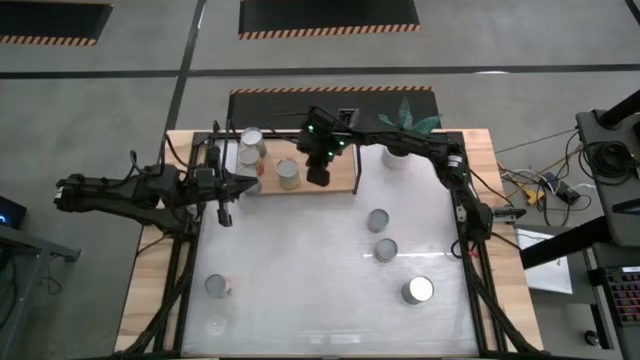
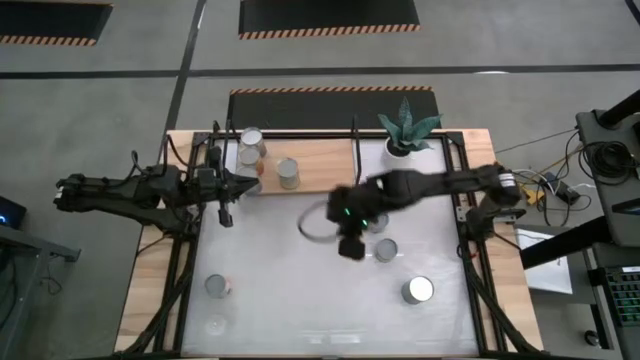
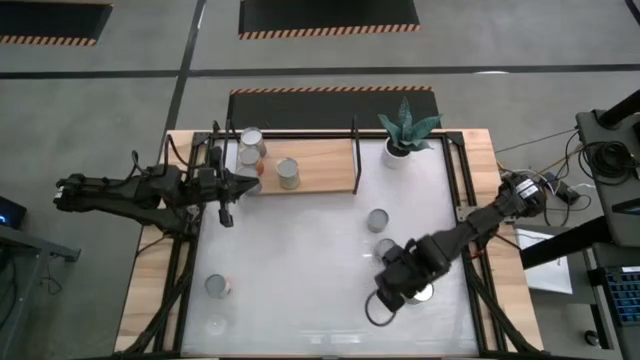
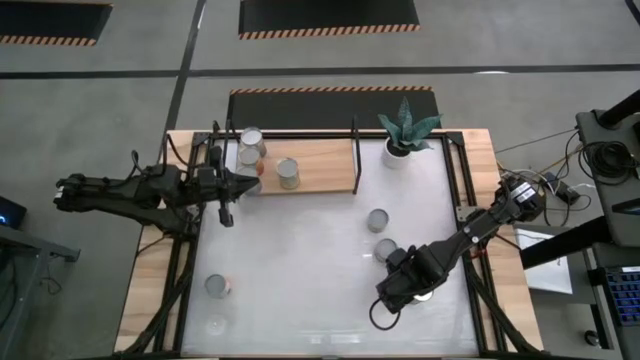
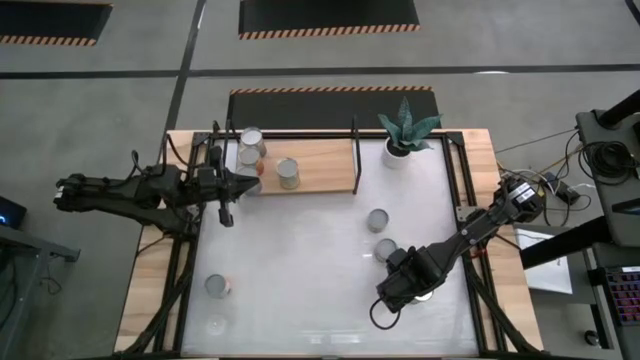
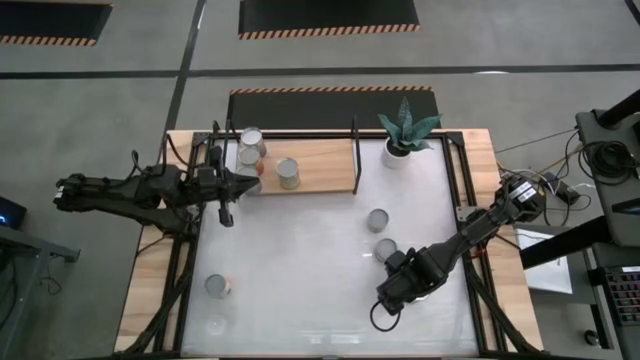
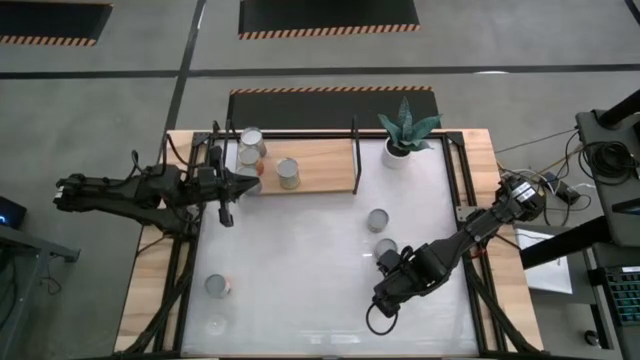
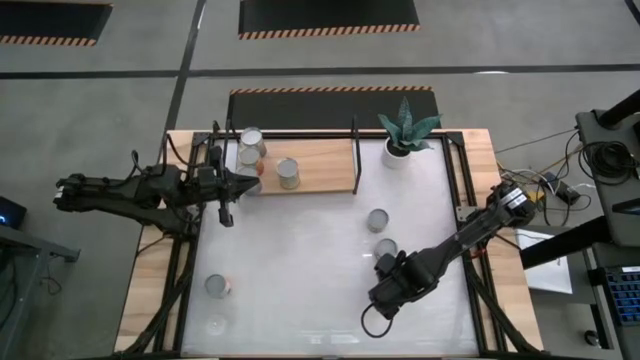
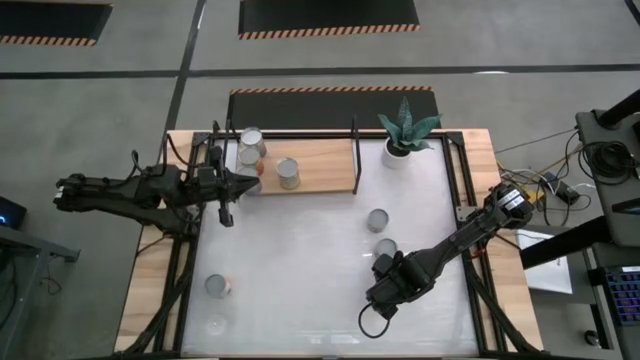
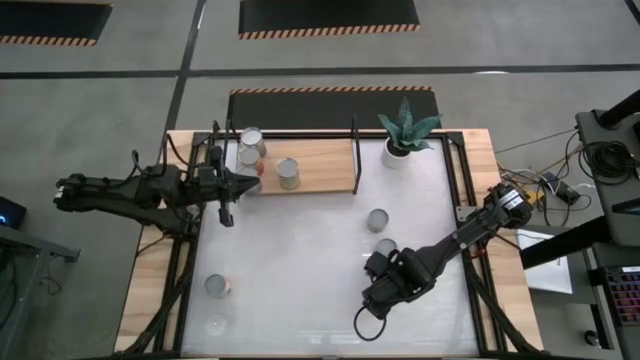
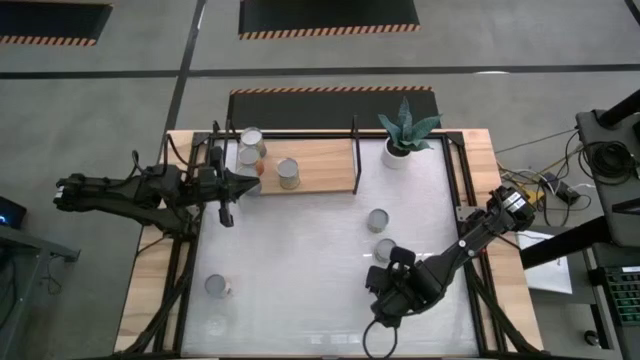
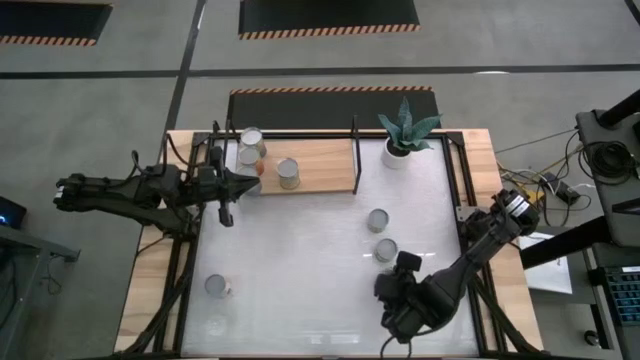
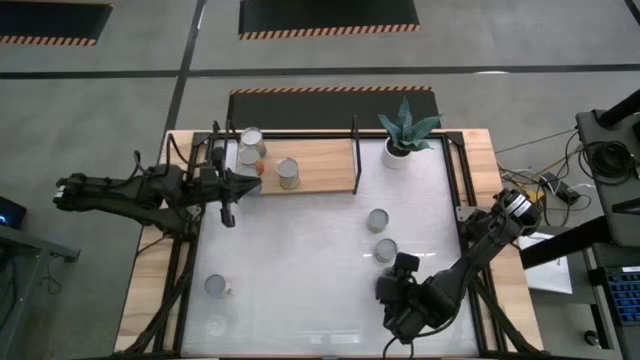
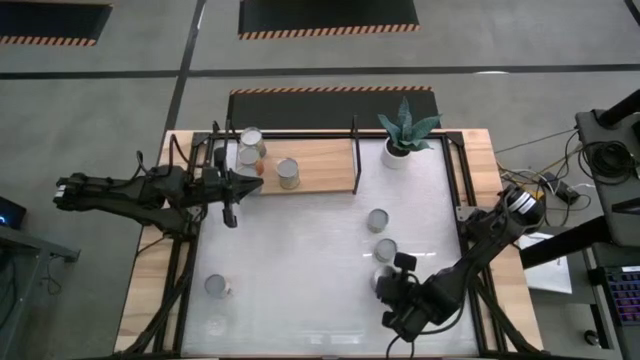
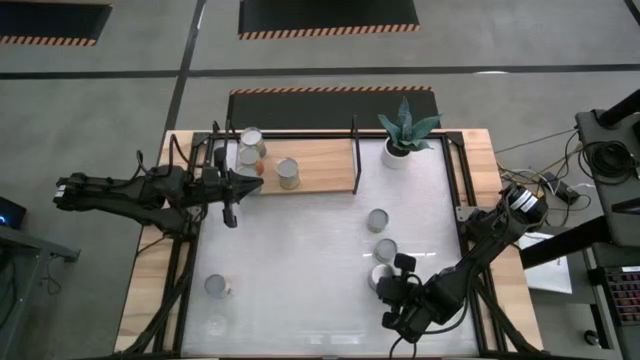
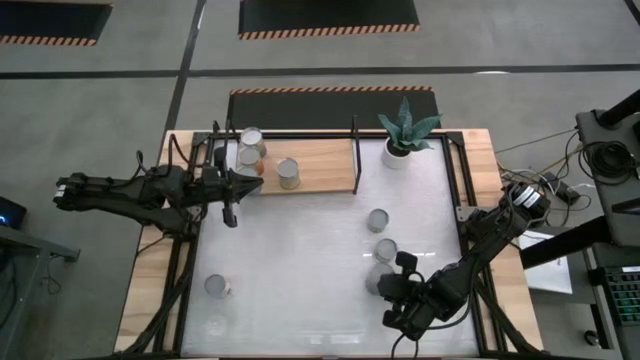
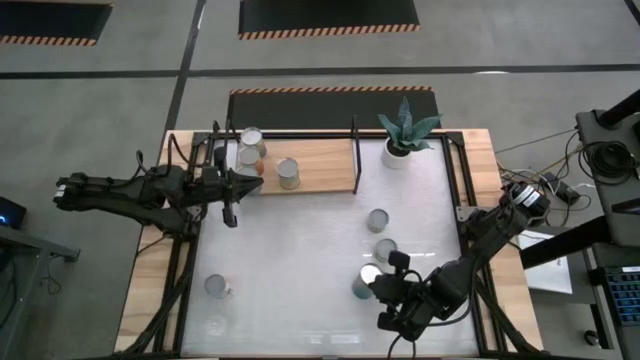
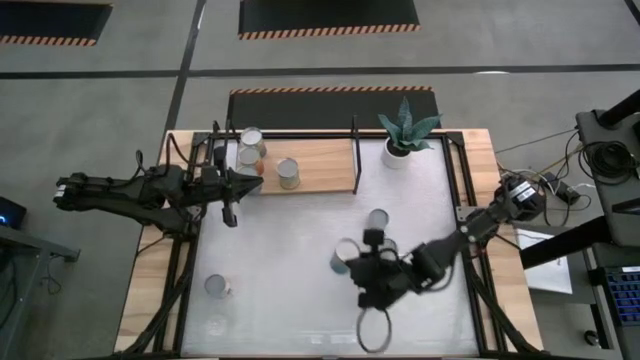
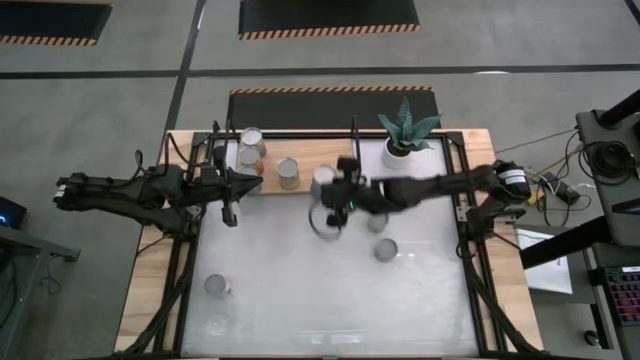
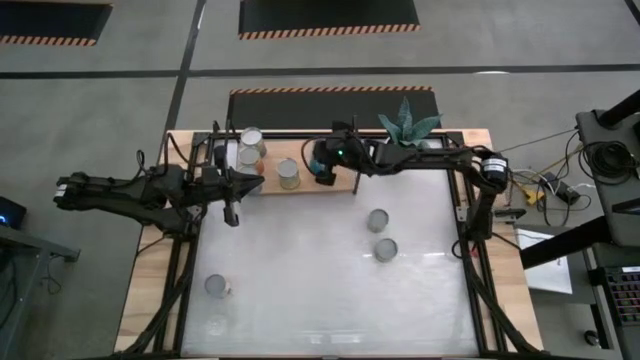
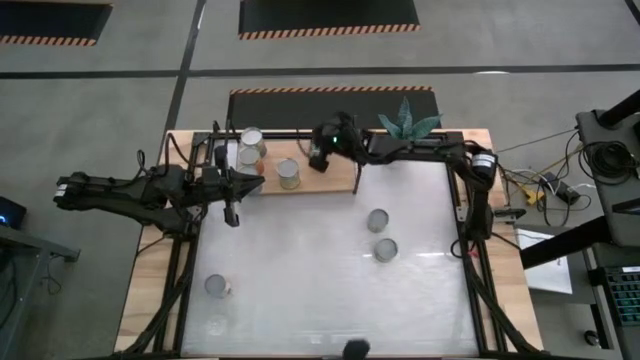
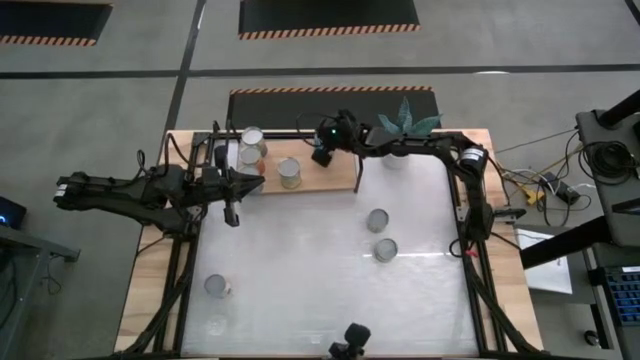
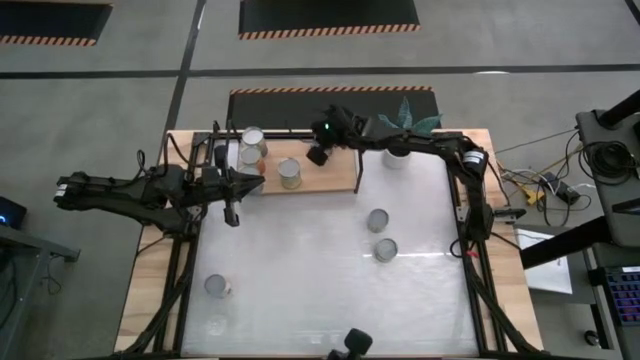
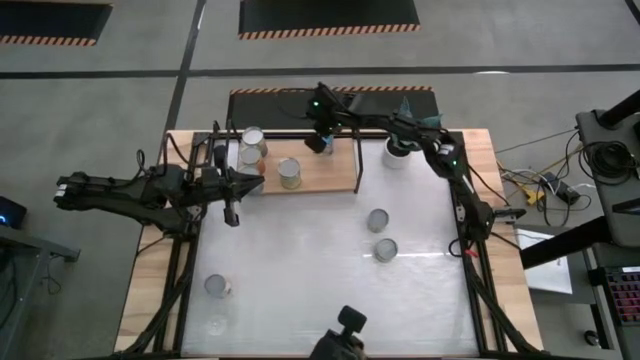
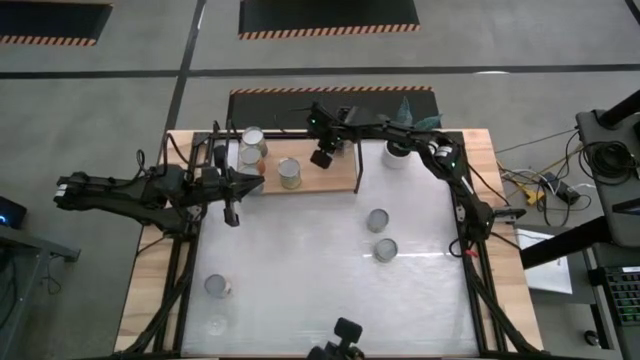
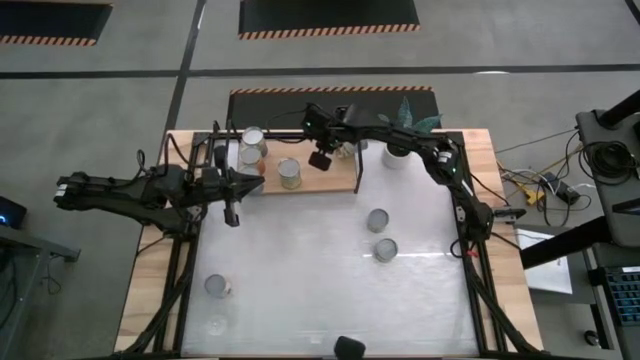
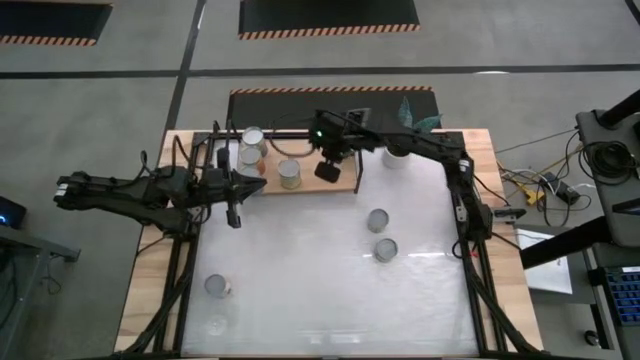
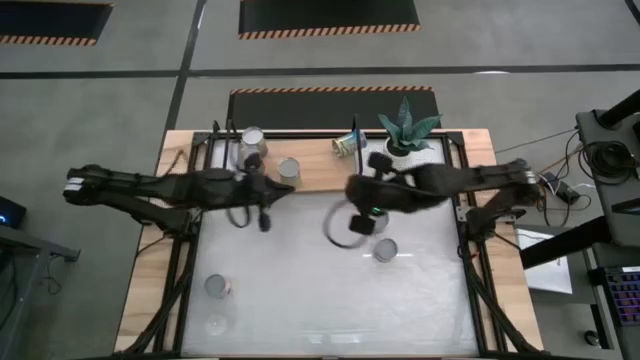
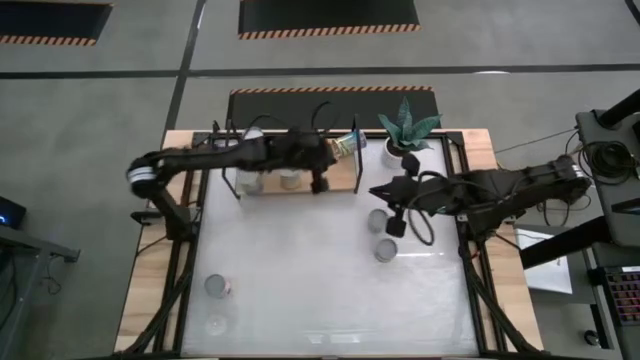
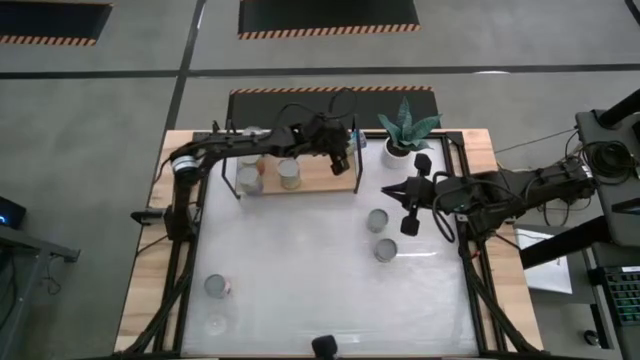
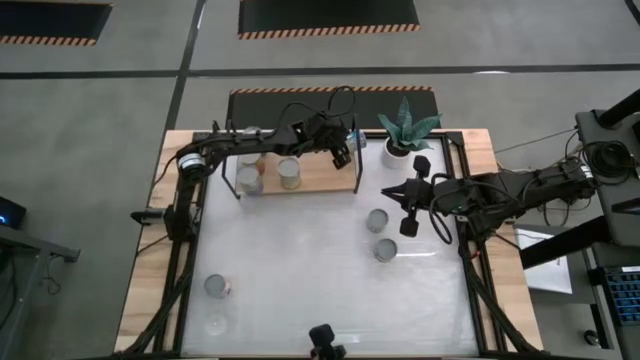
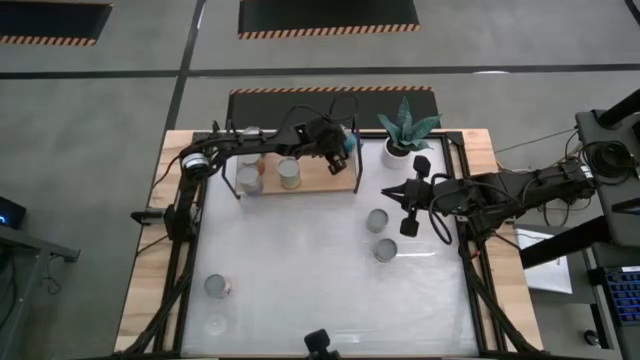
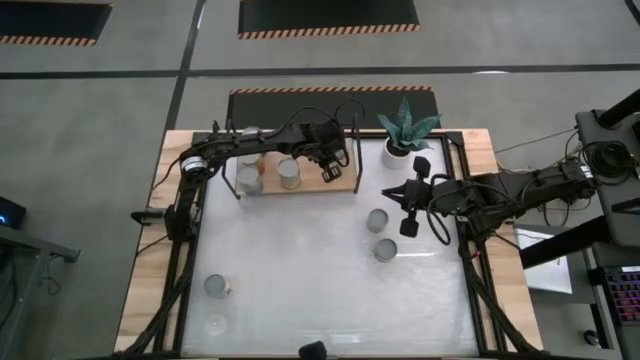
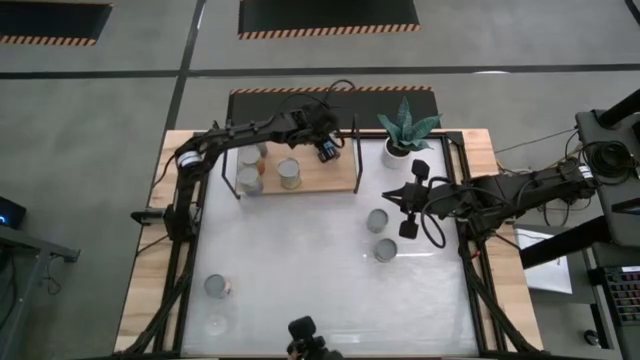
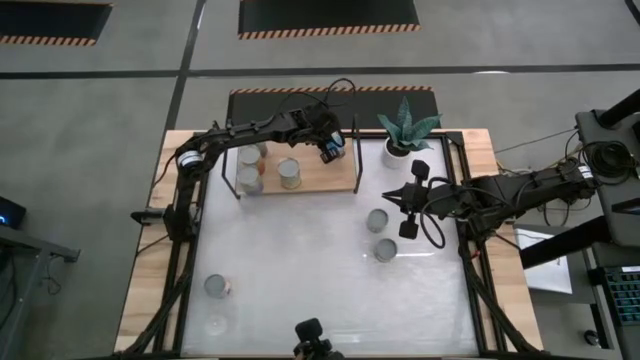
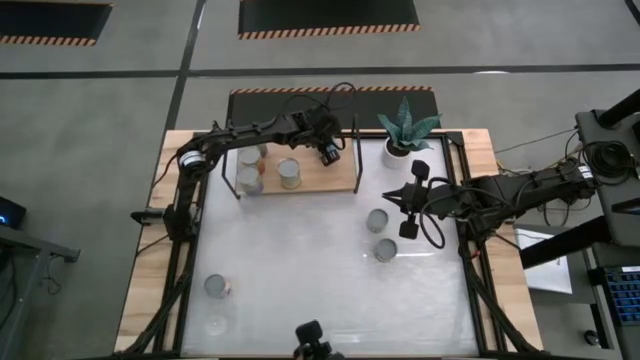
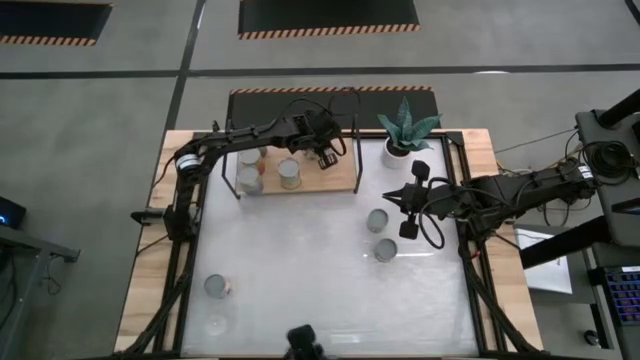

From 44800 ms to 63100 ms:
Task: Pick and place cans onto a shelf
Put the canned cherries on the shelf

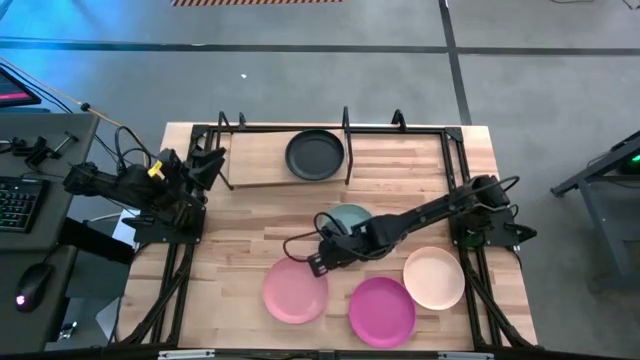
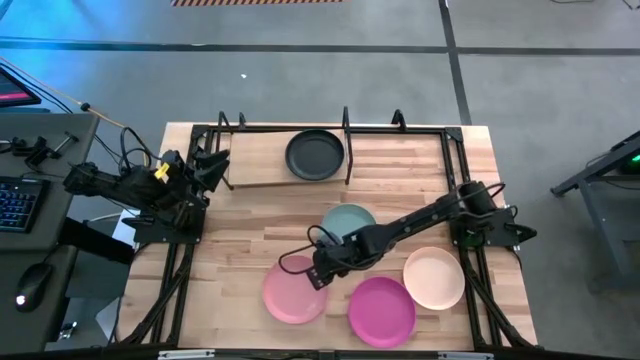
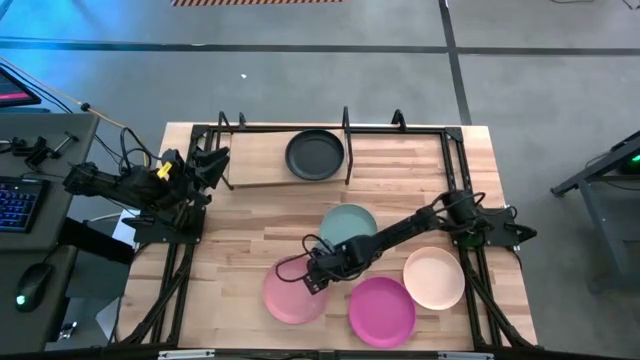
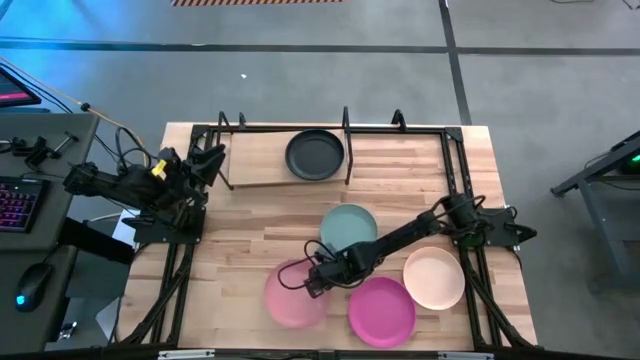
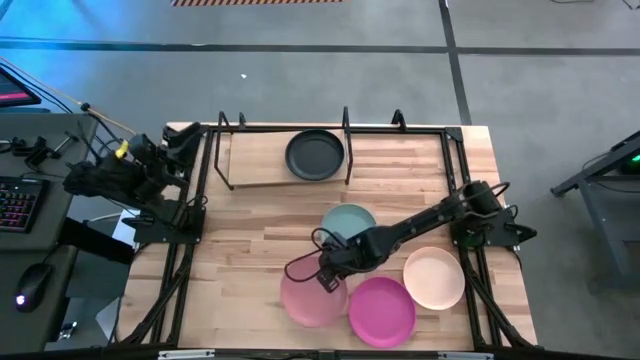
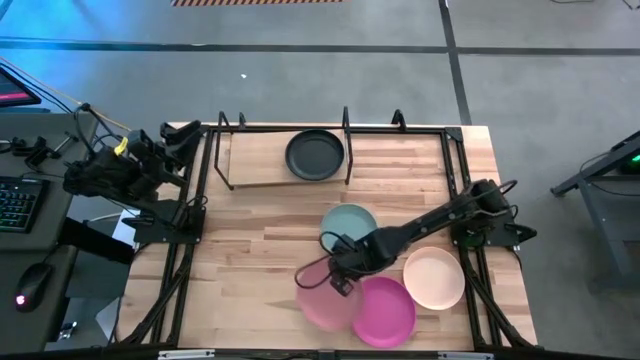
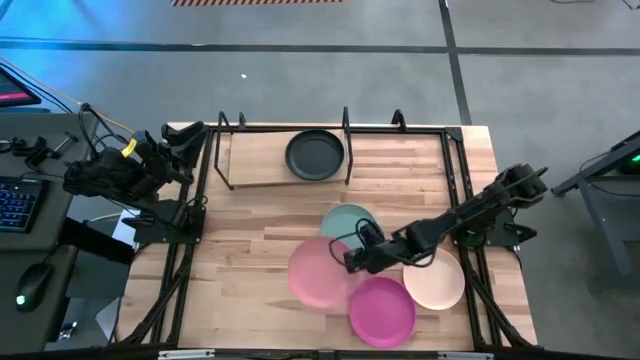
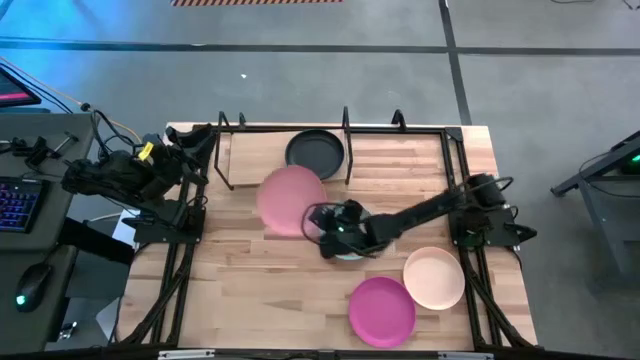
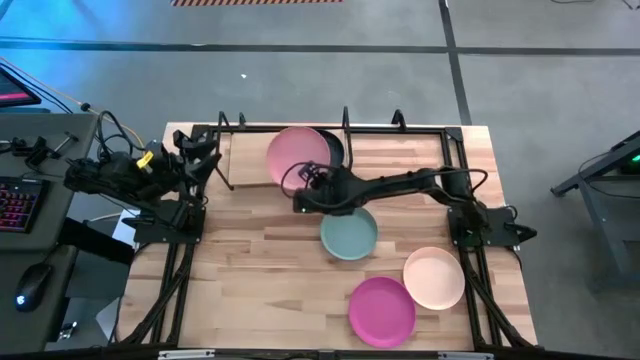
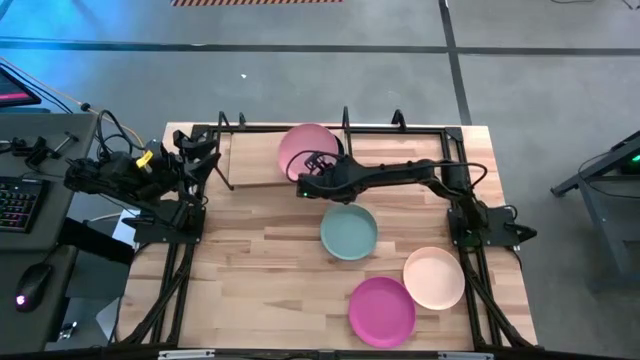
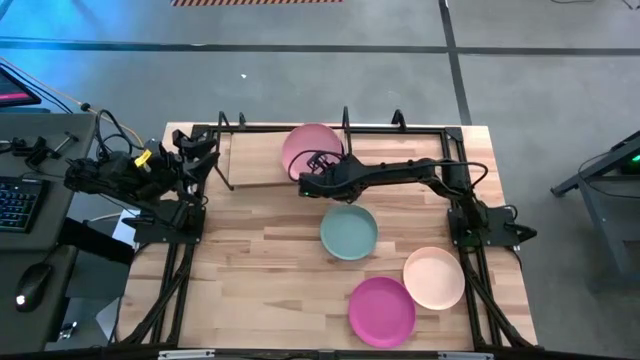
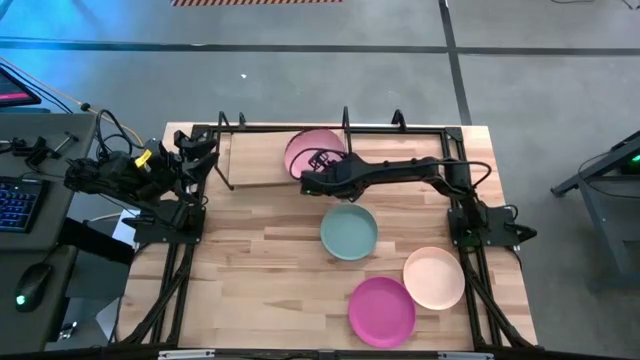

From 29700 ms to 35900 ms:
Task: Place and stack plates onto a shelf
Stack the light pink plate on top of the black plate on the shelf
